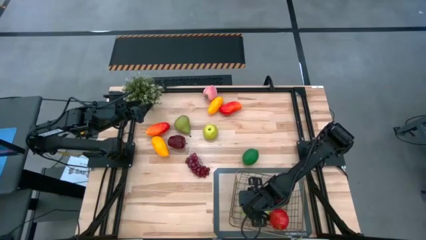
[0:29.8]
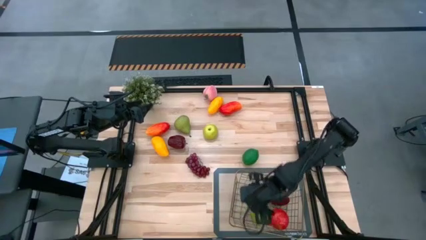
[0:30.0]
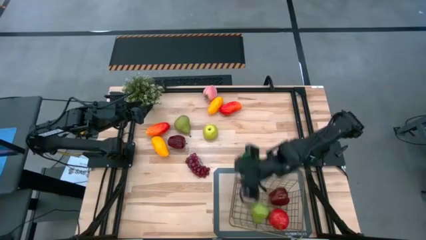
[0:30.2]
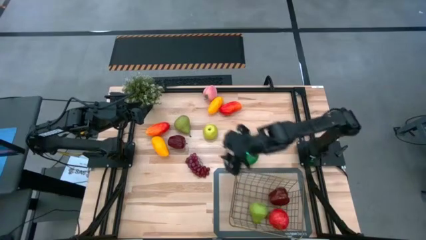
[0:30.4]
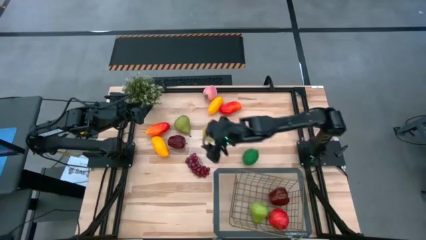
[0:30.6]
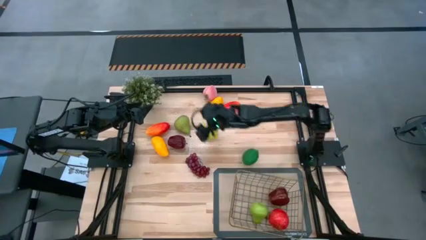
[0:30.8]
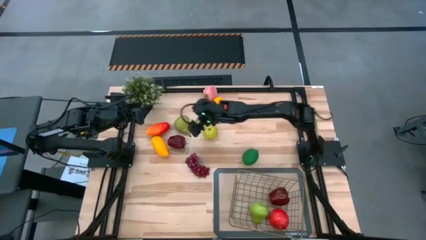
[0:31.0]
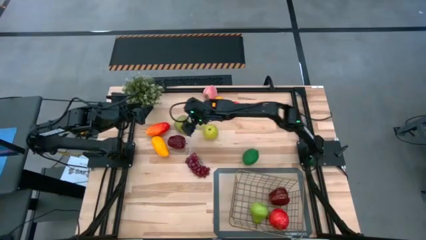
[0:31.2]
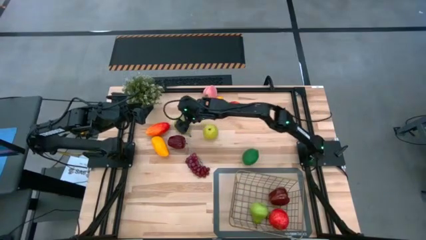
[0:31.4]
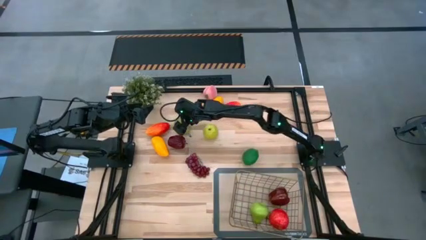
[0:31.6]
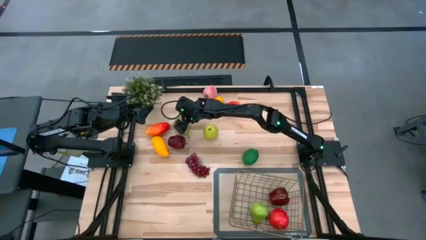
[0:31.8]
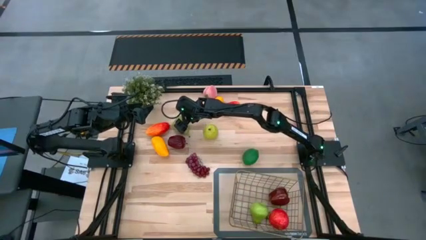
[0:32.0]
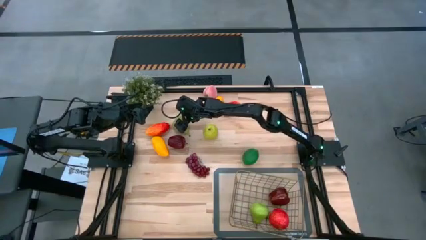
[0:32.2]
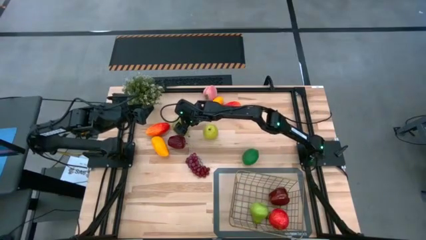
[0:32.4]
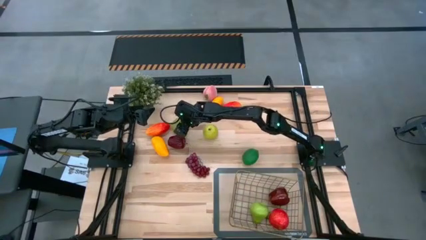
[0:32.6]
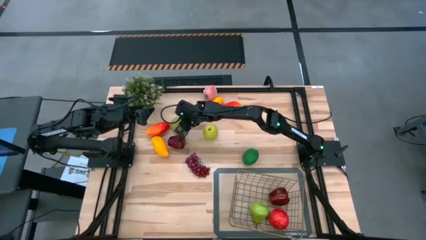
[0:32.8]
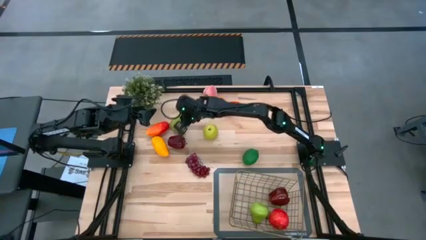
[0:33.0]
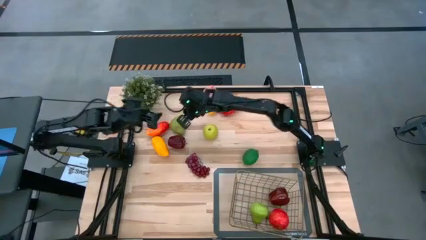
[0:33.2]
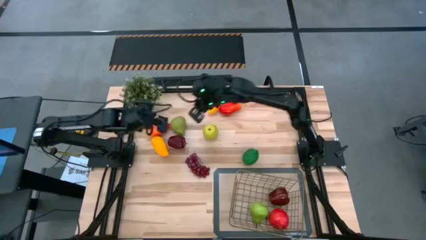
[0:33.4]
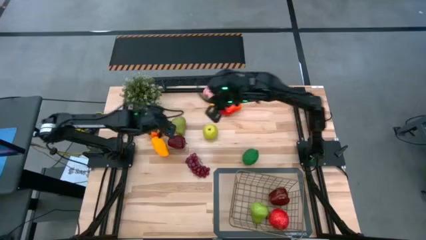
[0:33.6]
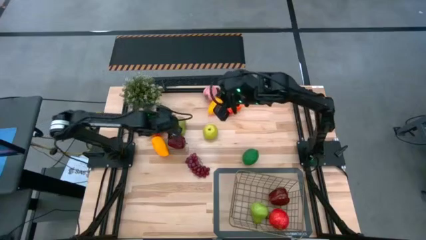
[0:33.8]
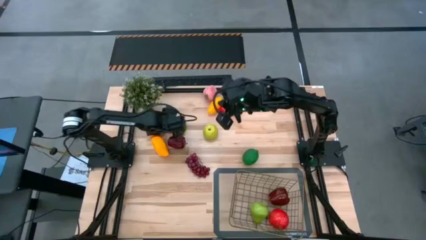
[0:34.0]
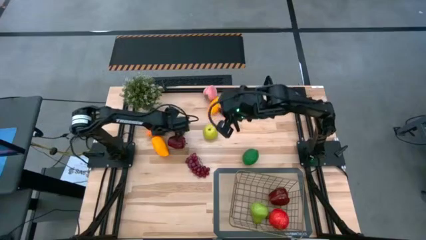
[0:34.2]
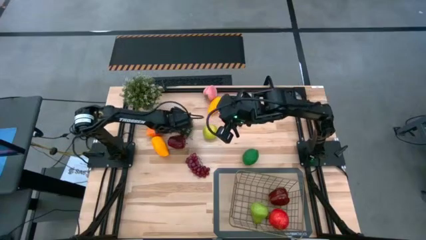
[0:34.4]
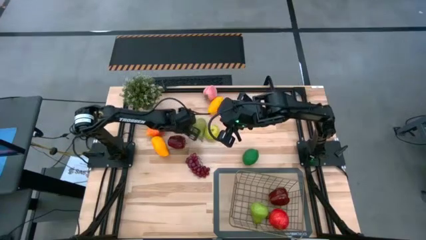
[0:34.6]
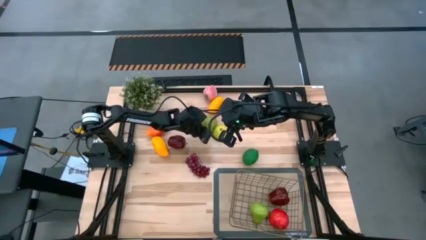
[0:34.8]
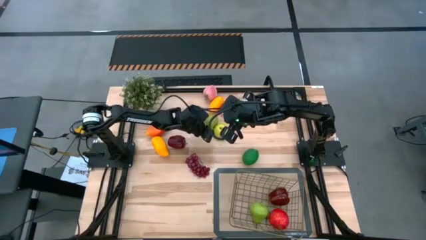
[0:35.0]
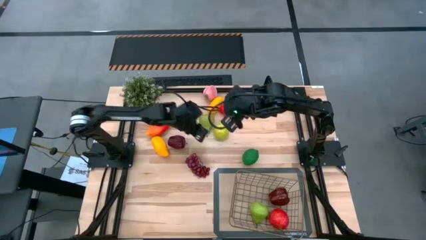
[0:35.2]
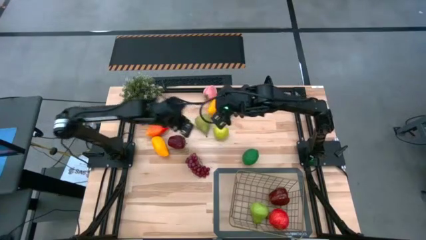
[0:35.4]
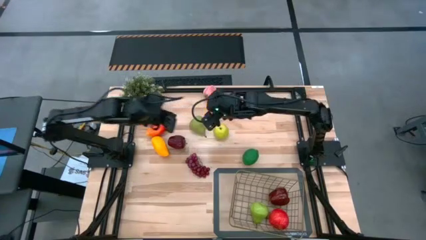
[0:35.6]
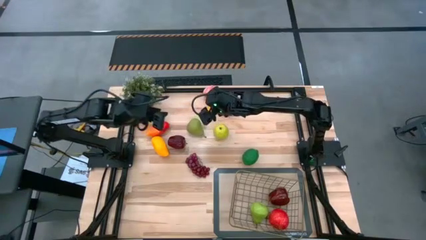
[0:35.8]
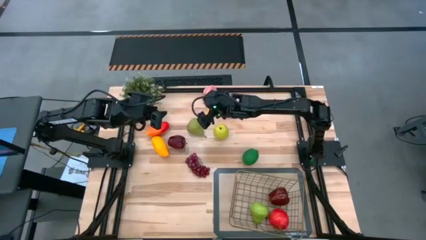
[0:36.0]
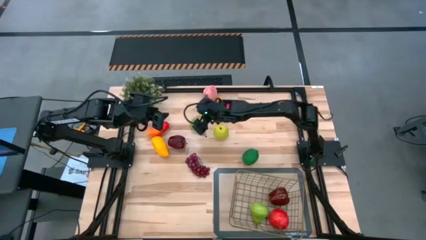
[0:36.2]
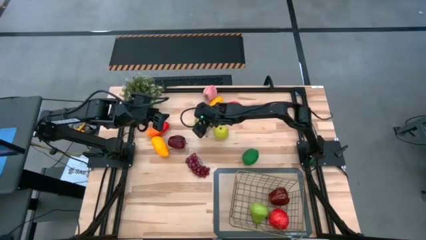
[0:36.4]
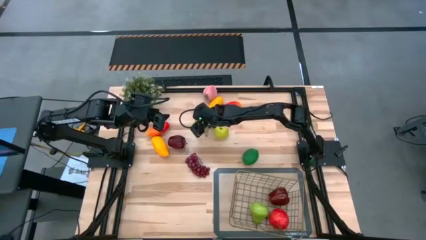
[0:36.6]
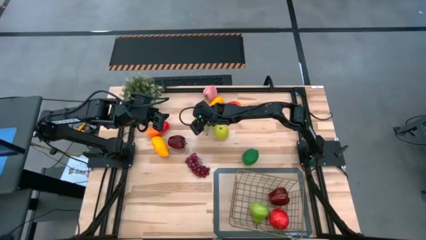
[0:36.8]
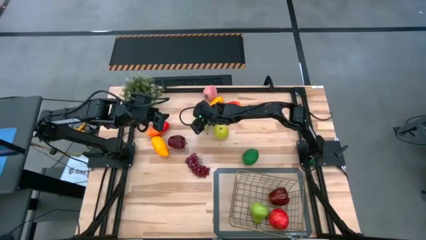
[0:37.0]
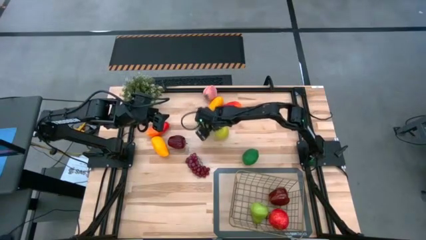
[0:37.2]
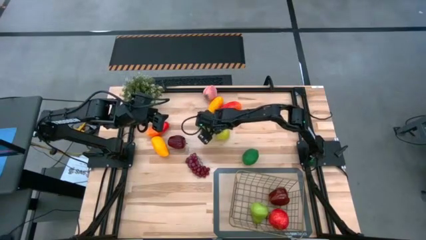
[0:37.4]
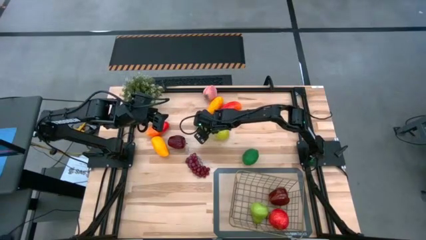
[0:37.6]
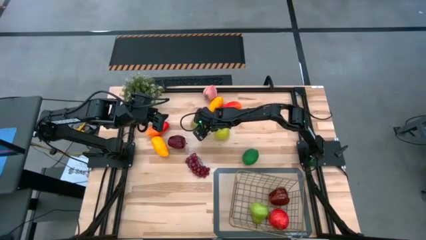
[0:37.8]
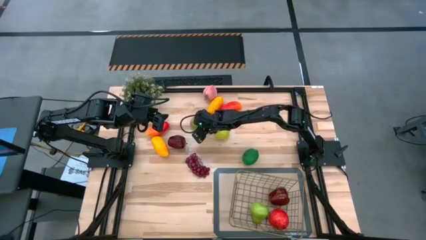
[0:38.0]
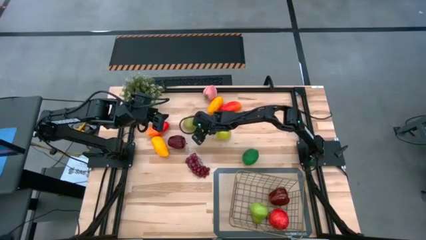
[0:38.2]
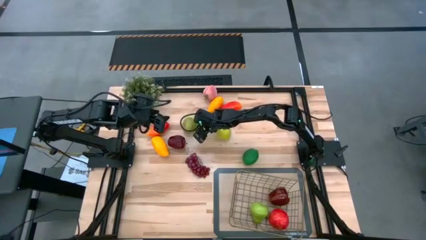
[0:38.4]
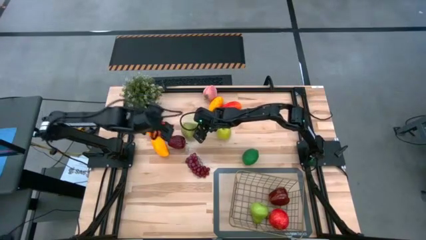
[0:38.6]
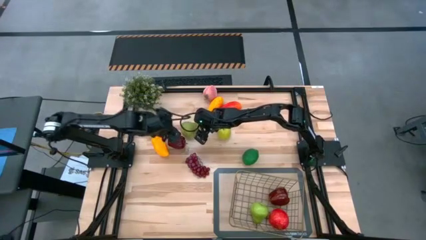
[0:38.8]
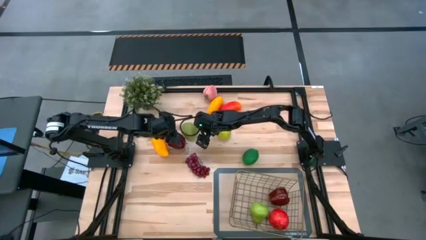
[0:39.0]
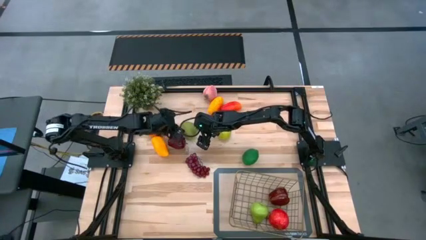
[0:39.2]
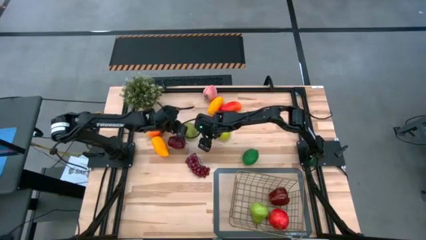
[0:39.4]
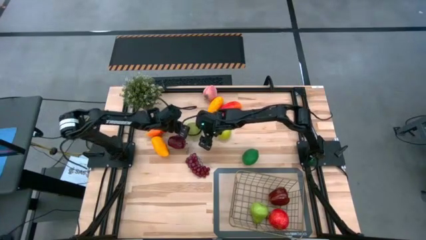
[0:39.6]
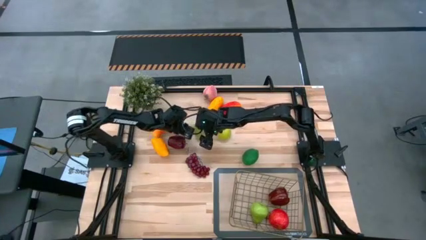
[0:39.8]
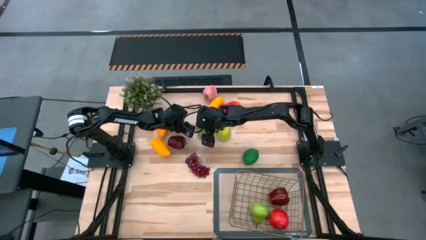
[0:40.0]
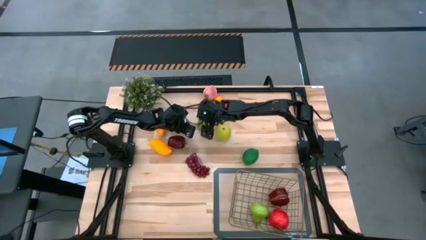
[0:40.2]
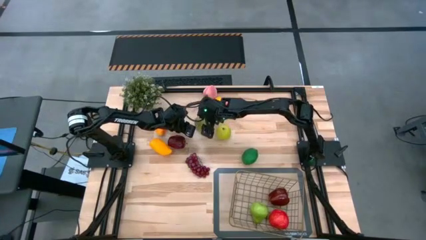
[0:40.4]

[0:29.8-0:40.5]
Task: Build produce basket
Put the green pear into the wire basket

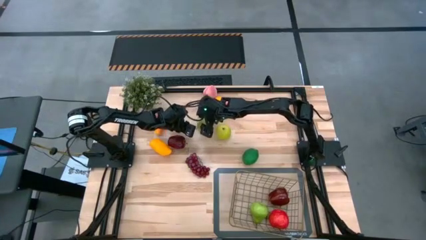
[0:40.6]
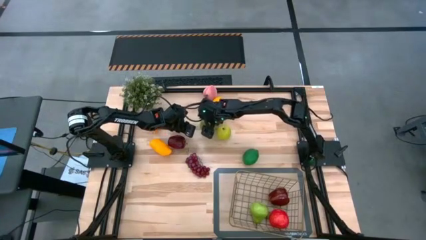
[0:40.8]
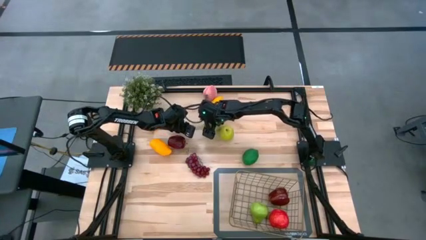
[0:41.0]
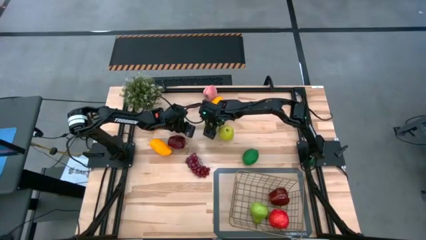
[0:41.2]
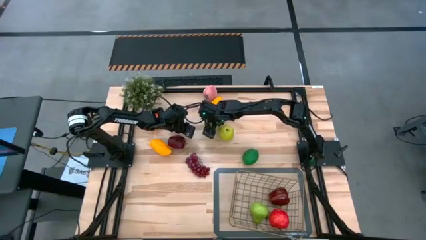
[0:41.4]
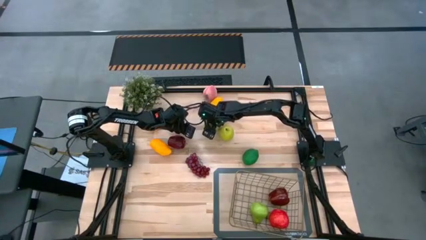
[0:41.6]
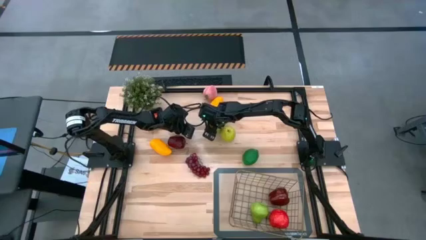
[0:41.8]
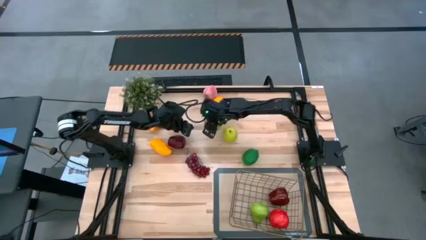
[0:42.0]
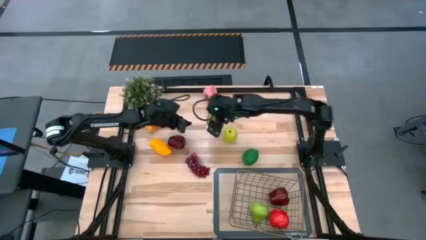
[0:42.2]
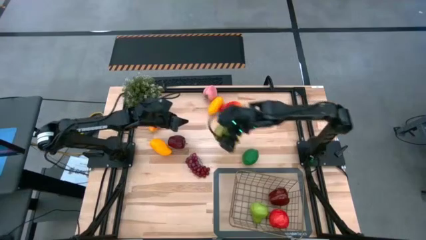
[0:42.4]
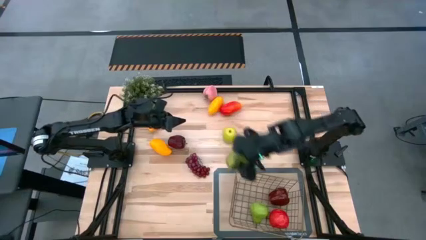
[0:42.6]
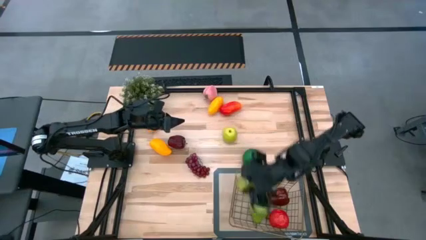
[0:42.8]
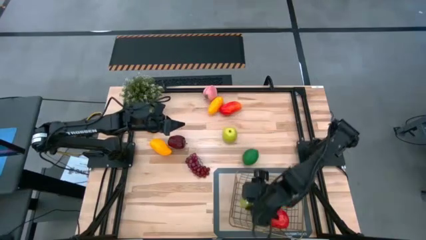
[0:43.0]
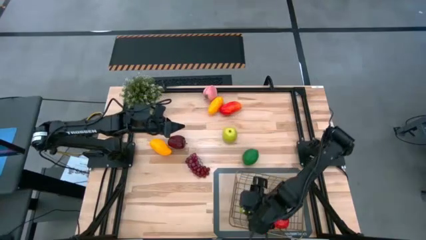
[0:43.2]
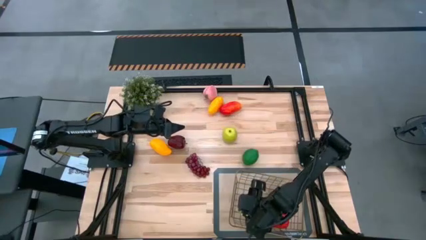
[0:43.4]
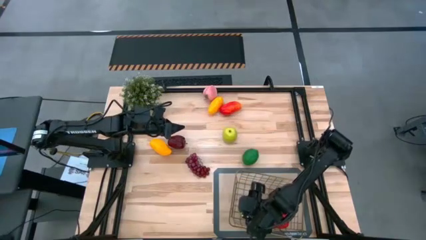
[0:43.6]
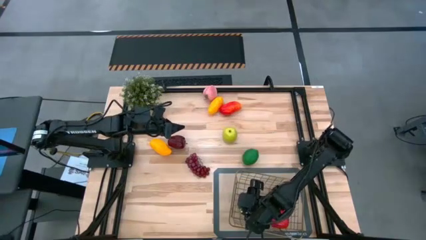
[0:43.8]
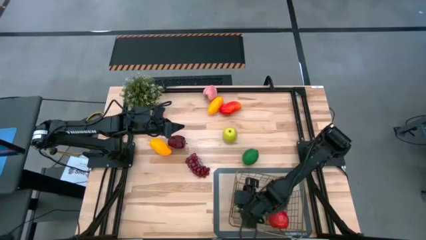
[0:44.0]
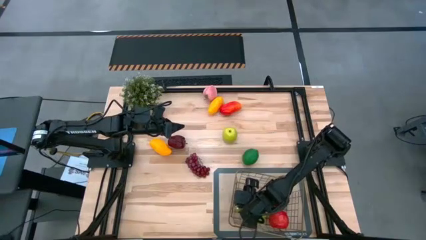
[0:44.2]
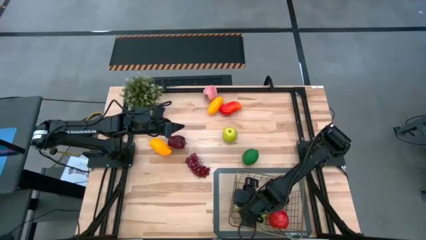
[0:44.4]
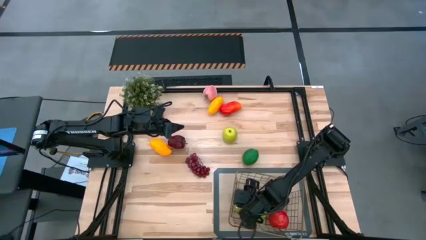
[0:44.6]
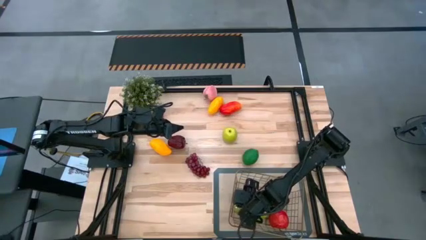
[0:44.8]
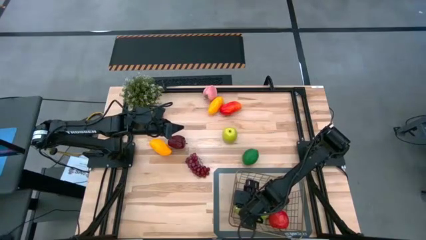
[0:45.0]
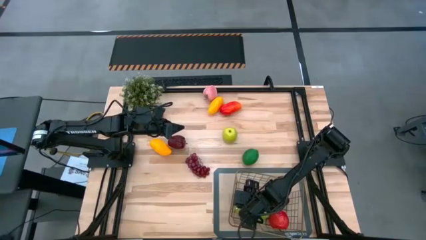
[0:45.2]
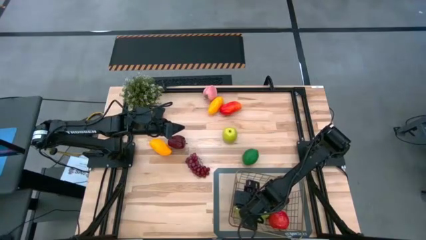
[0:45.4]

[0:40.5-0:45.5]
Put the green pear into the wire basket
